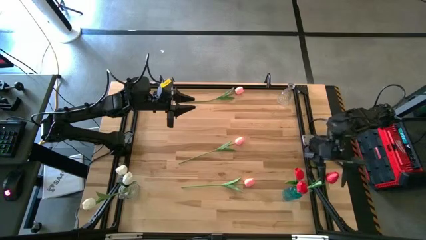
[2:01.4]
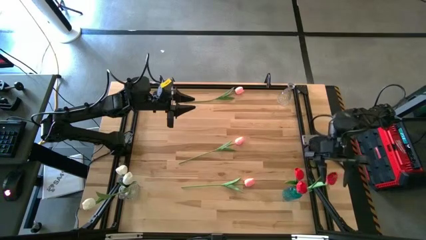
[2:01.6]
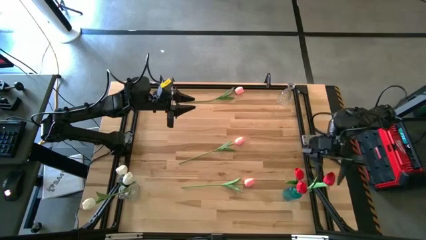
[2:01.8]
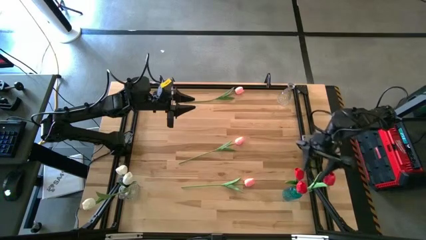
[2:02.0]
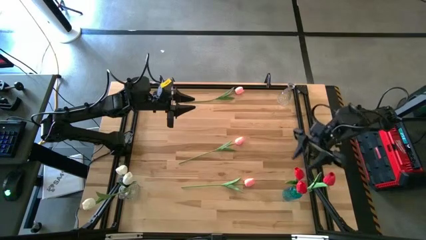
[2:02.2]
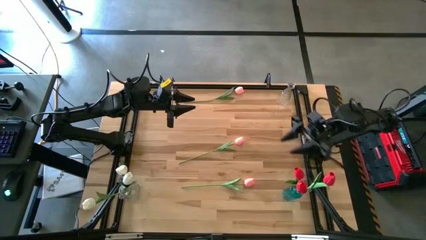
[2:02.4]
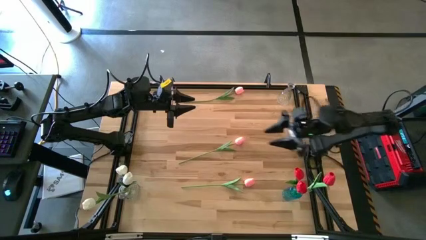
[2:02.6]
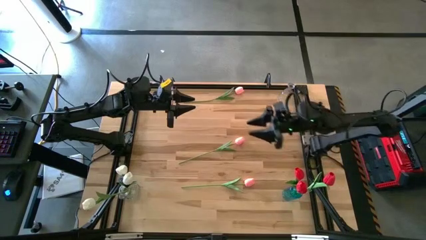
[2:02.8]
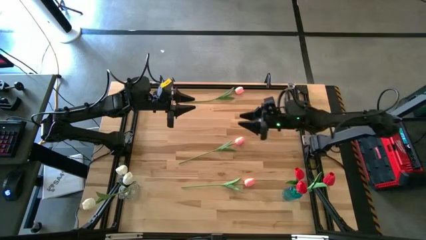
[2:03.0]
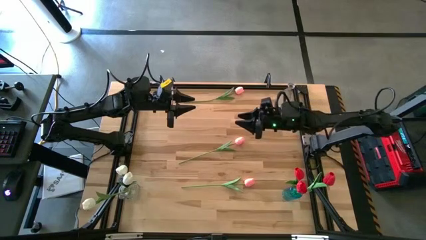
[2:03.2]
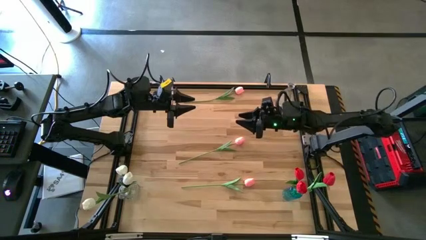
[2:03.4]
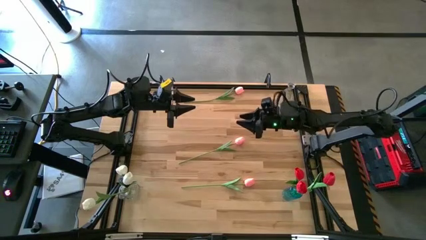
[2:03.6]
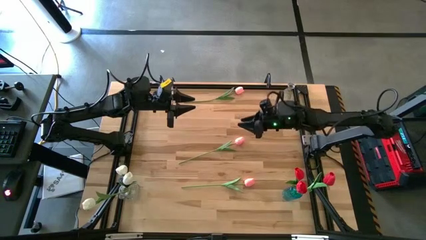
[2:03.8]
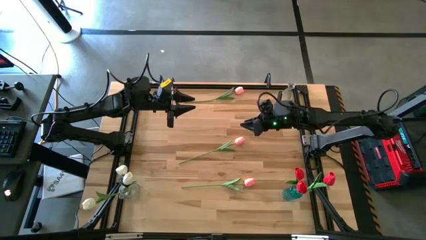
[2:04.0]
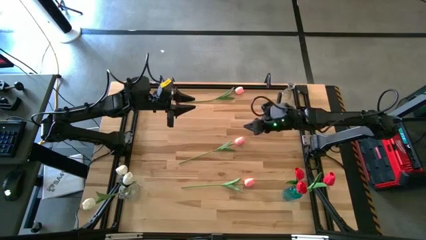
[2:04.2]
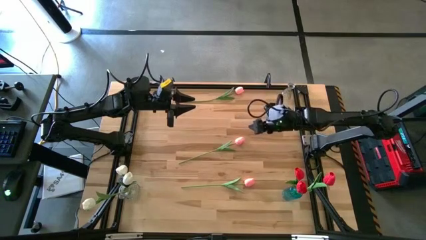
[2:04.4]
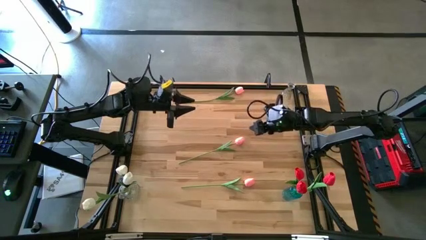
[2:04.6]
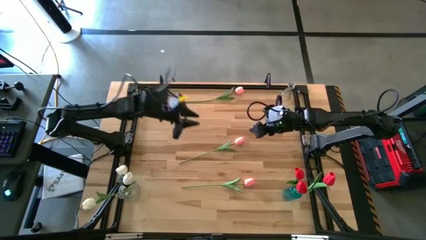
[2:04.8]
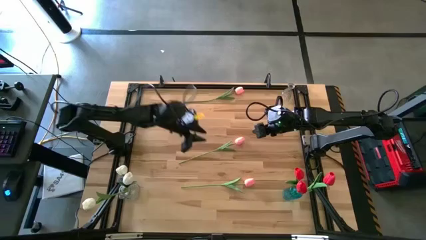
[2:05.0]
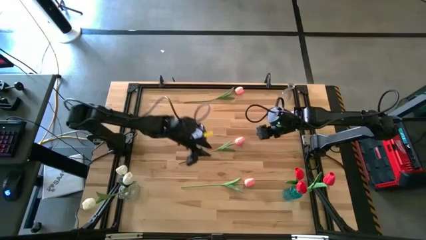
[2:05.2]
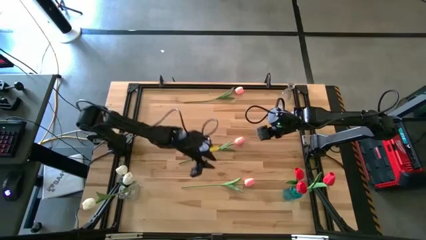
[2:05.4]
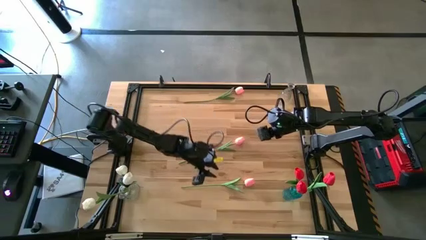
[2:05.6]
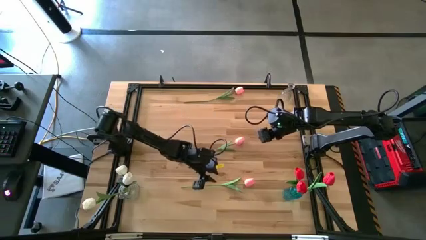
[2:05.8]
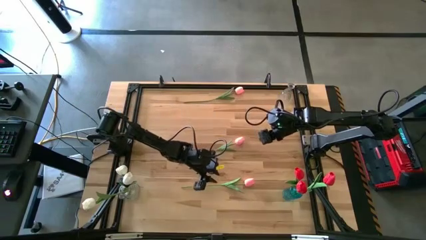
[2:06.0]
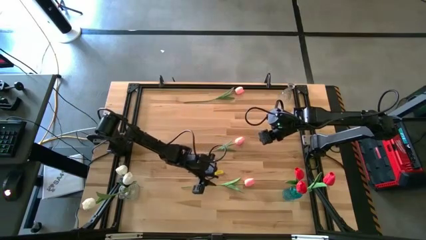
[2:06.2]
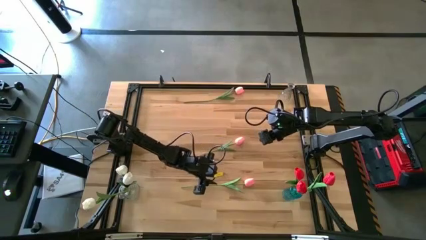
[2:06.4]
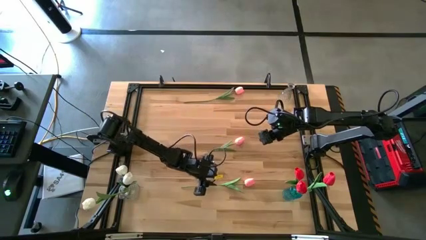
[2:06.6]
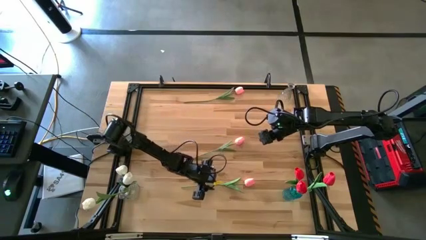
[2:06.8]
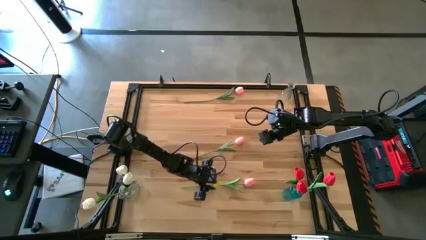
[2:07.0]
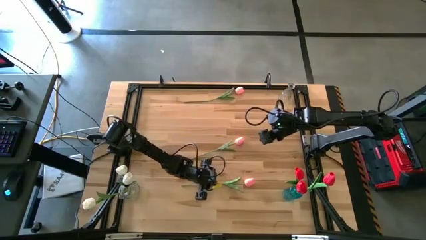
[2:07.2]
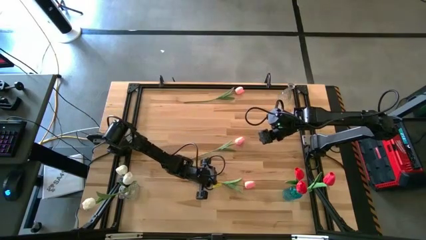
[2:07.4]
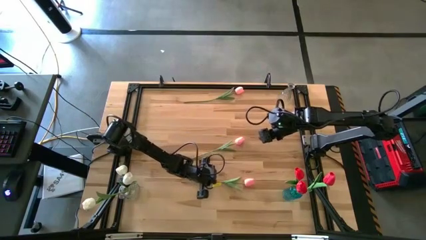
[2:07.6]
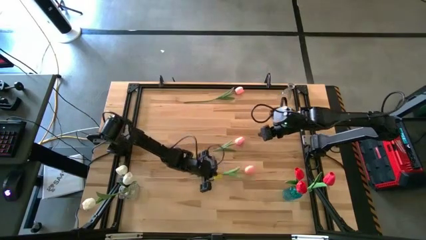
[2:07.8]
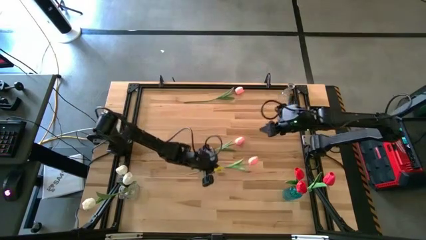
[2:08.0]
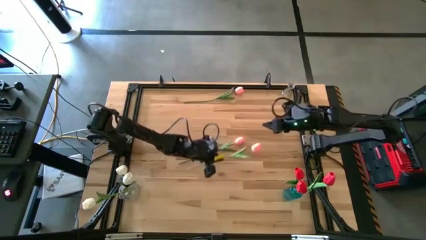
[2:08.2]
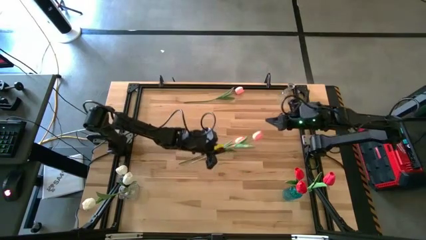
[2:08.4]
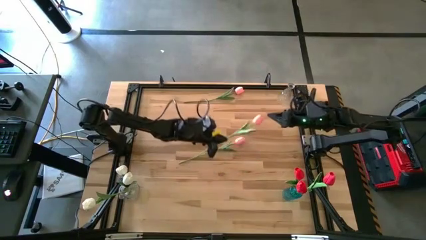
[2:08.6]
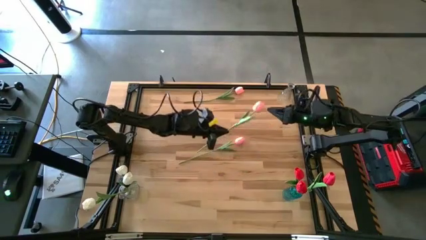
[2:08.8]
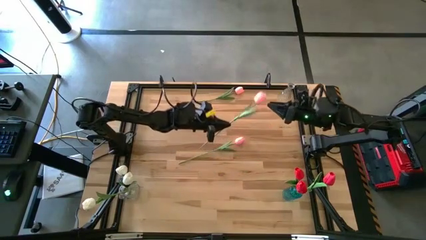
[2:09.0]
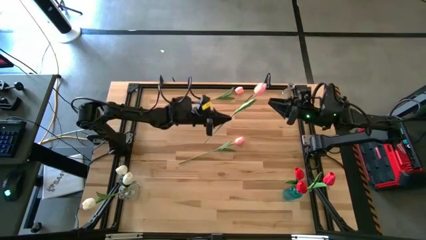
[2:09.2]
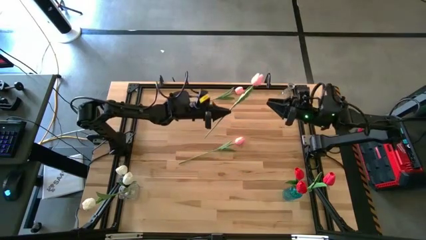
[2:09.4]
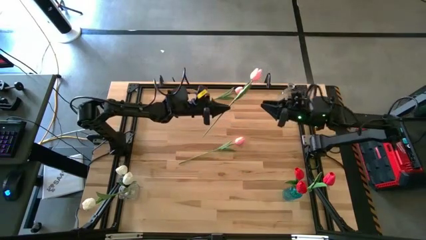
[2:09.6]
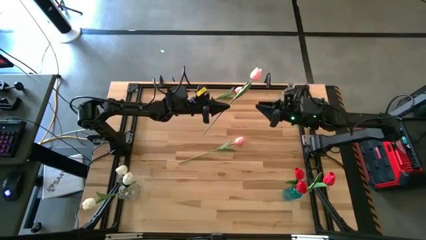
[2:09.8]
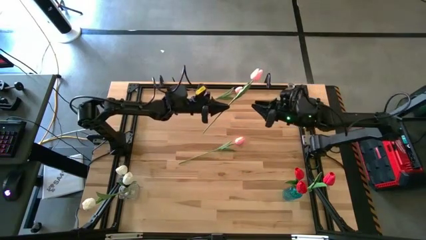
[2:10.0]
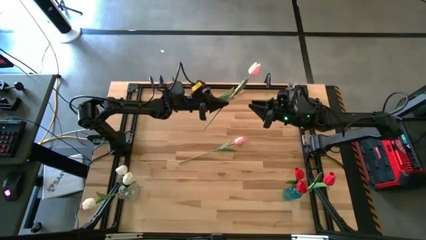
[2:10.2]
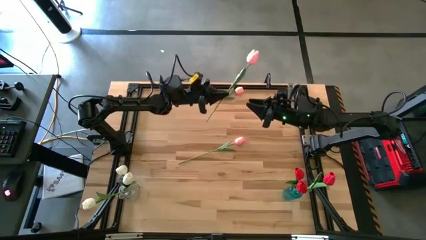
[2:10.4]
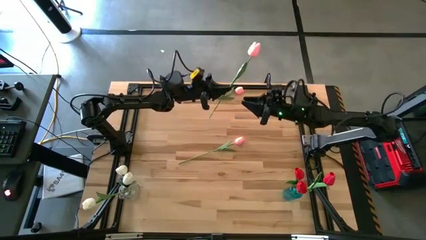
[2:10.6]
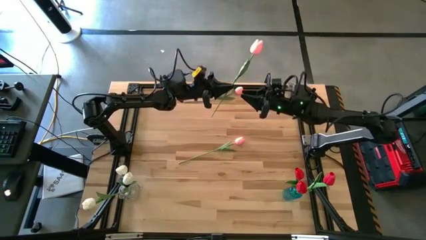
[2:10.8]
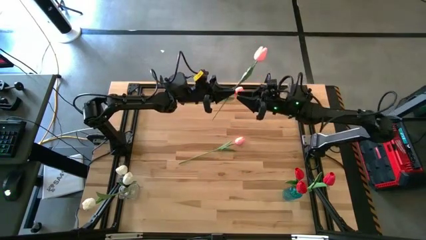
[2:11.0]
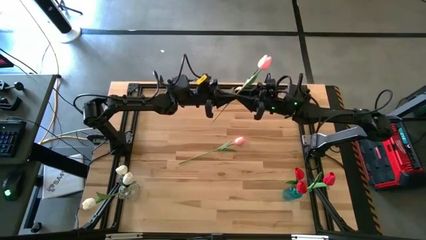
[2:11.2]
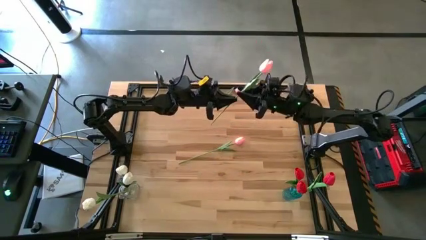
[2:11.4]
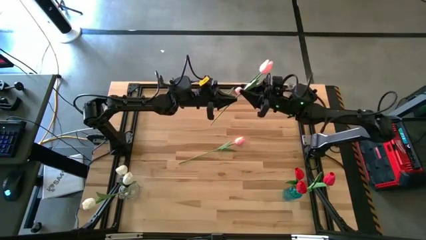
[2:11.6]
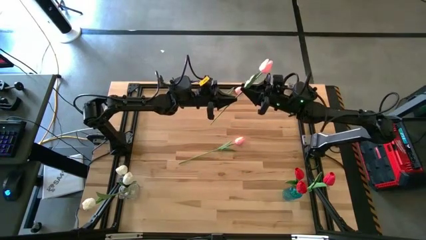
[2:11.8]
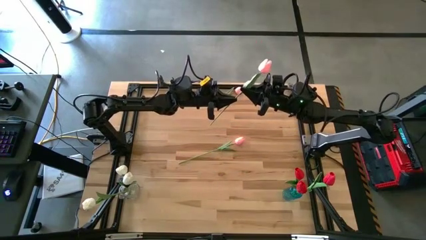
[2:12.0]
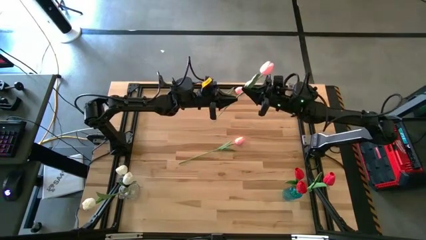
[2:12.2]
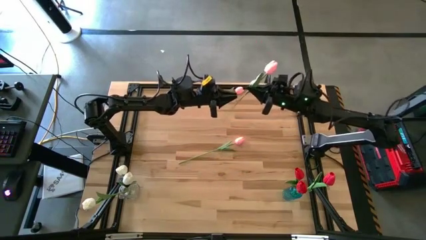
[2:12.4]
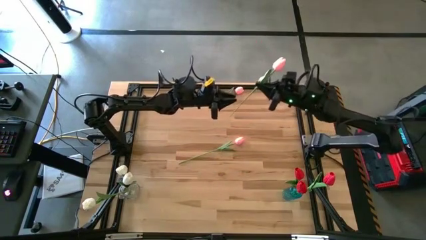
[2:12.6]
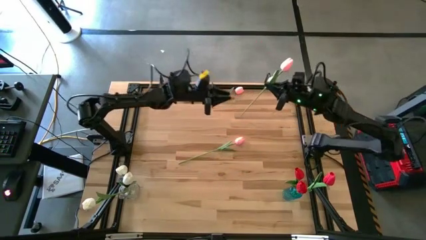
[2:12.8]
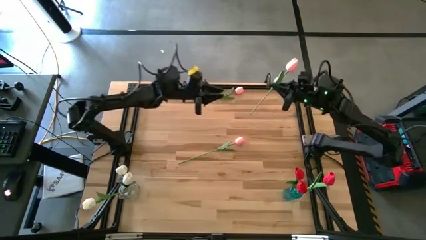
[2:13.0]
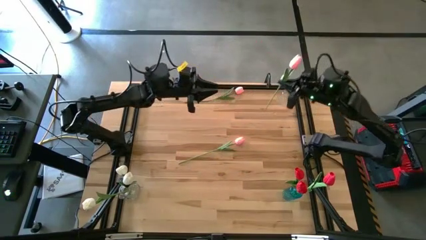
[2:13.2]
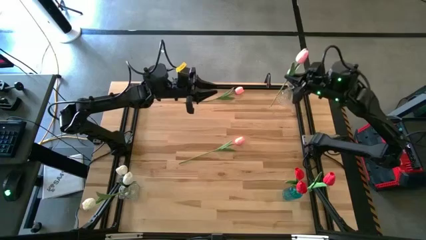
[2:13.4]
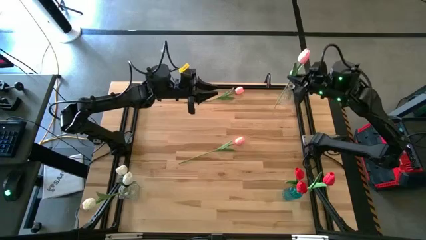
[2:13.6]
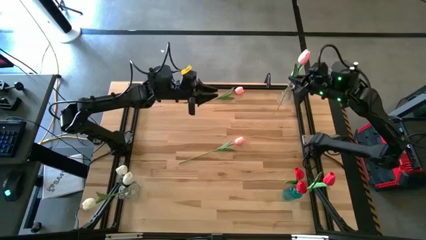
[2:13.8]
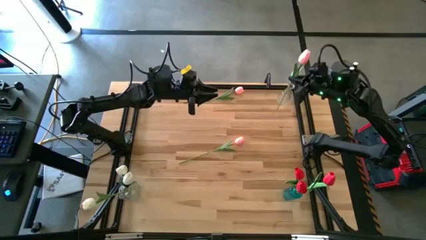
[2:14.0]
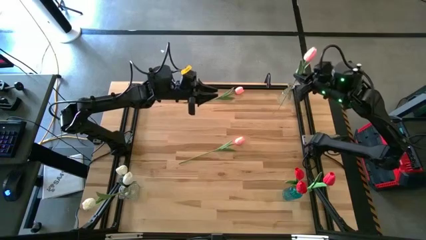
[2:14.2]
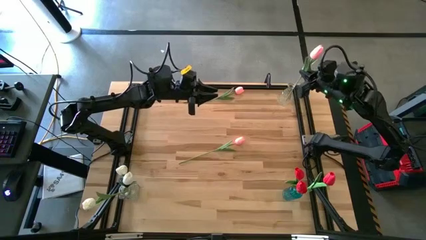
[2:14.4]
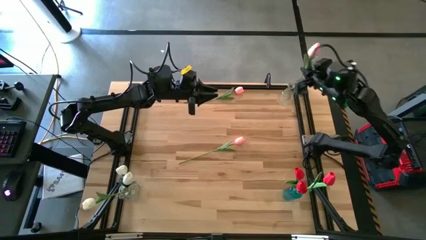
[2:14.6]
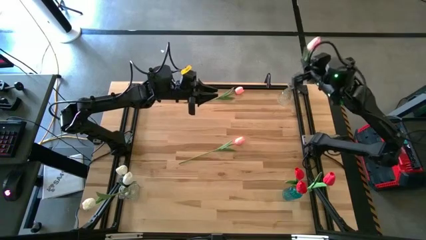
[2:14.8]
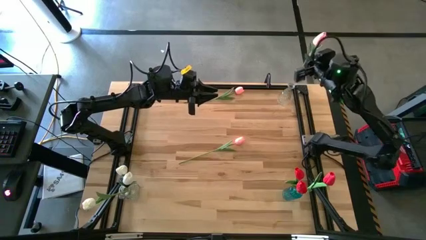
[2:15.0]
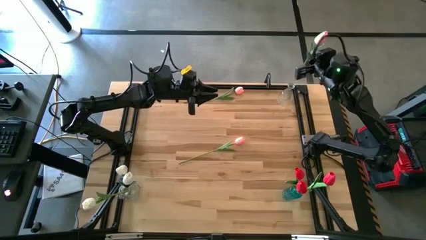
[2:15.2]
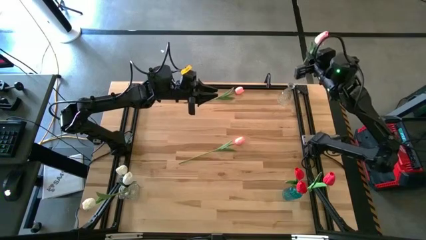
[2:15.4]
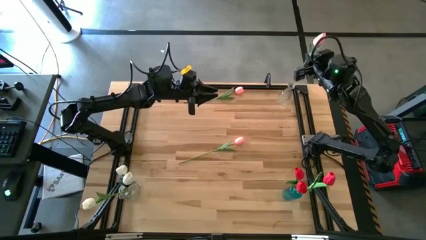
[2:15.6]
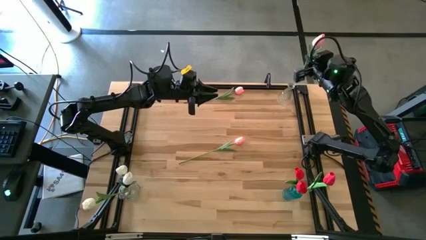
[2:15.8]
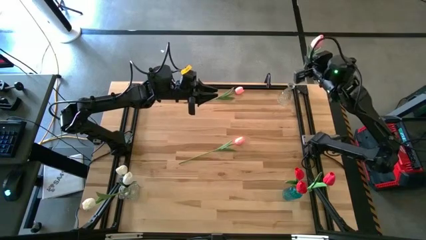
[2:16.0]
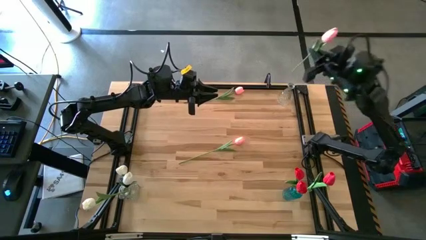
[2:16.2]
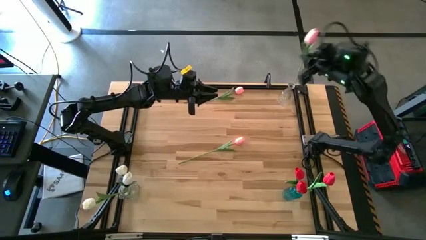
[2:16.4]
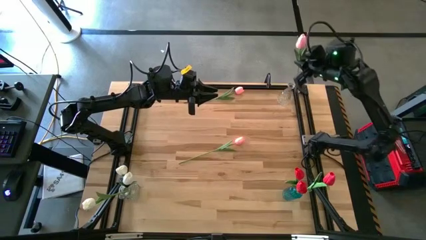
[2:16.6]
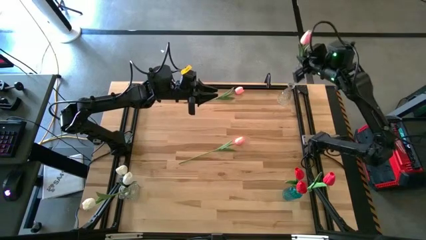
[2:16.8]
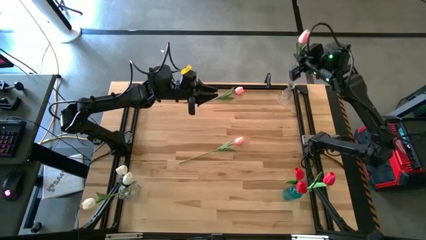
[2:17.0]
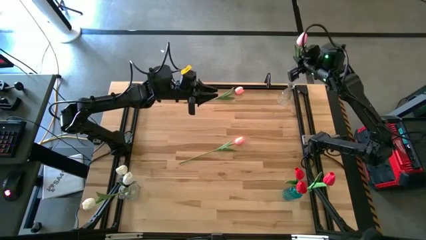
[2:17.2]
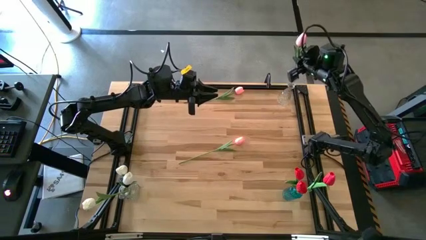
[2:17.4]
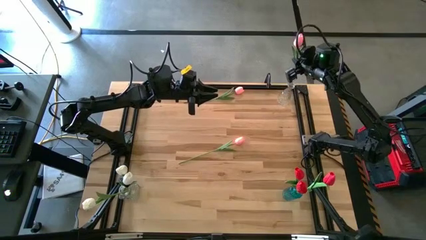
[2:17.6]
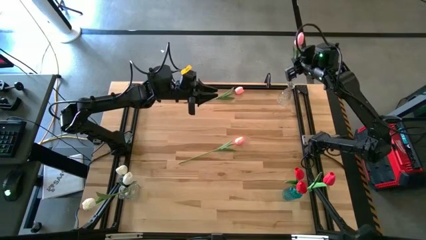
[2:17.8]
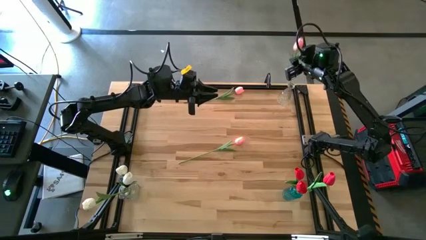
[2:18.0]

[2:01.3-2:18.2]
Task: Sort flowers into vase by color
Put the bottom pink flower into the top transparent vase
